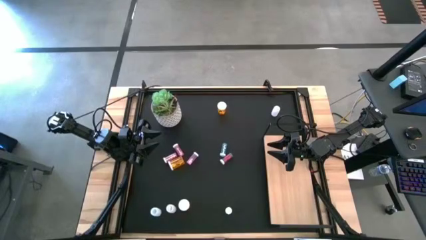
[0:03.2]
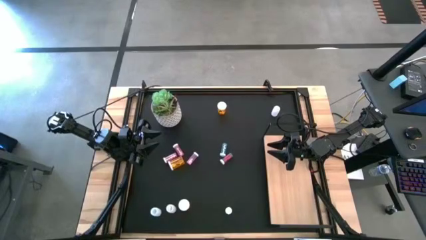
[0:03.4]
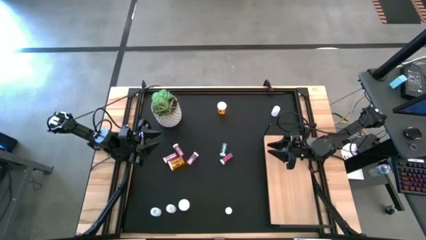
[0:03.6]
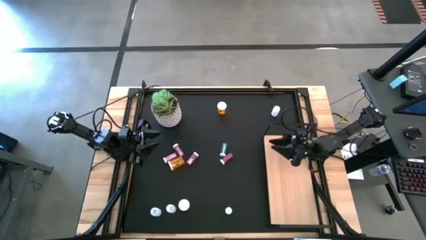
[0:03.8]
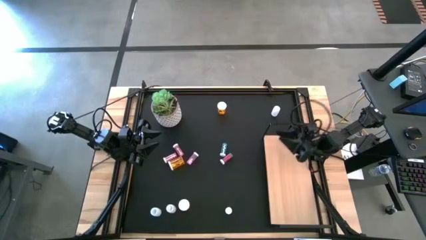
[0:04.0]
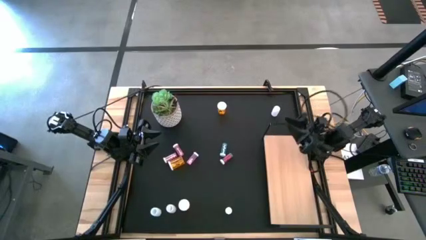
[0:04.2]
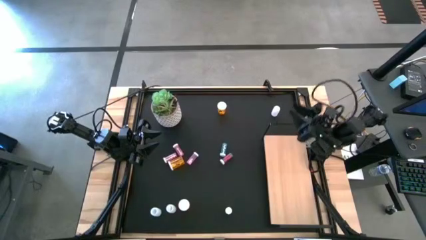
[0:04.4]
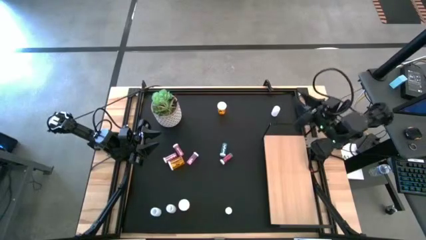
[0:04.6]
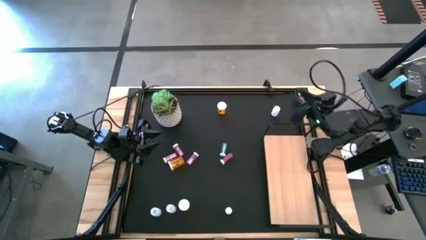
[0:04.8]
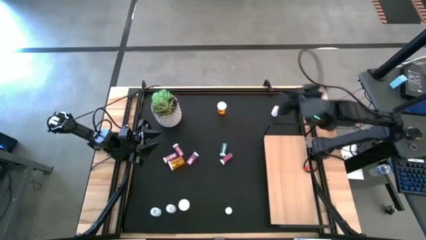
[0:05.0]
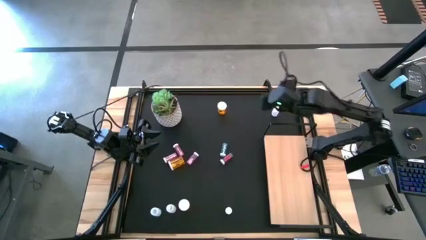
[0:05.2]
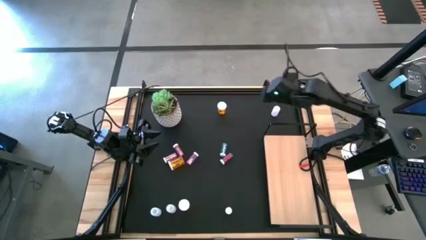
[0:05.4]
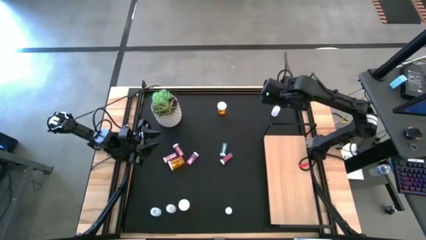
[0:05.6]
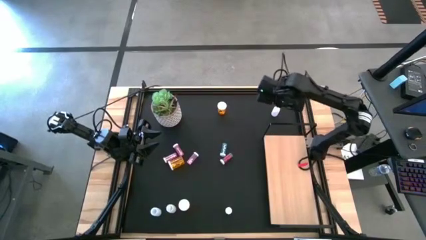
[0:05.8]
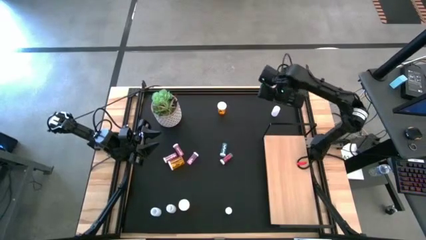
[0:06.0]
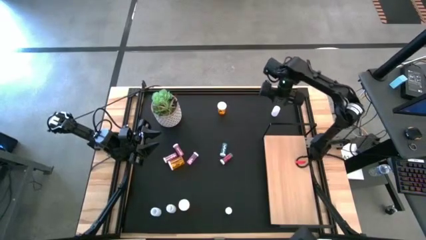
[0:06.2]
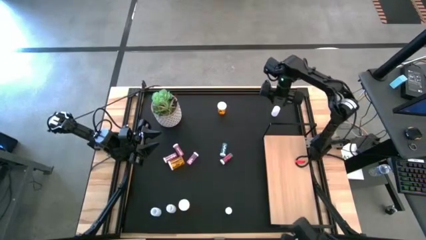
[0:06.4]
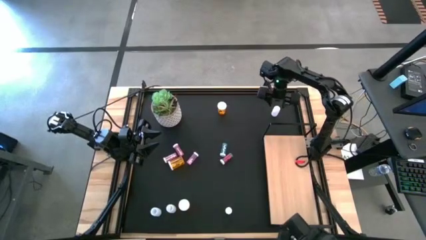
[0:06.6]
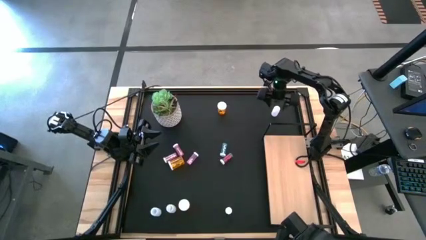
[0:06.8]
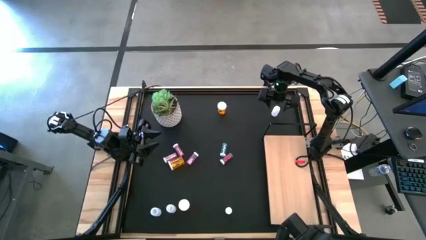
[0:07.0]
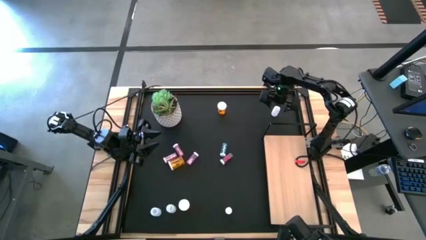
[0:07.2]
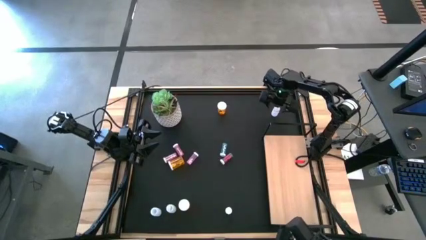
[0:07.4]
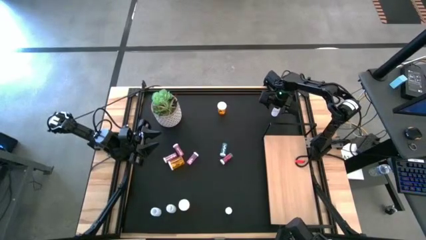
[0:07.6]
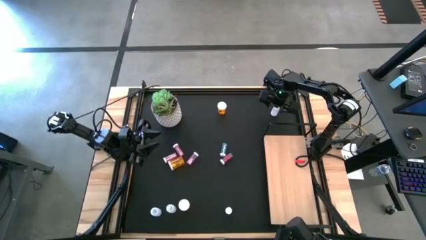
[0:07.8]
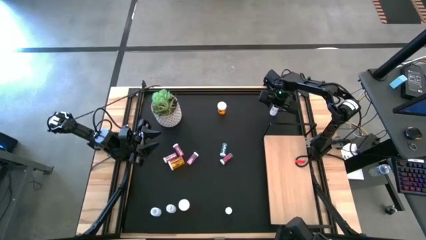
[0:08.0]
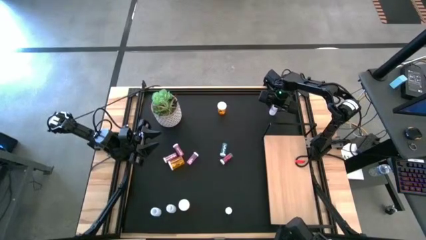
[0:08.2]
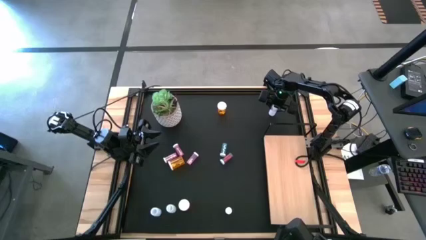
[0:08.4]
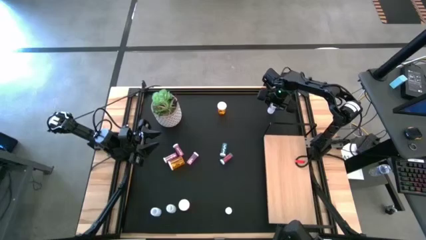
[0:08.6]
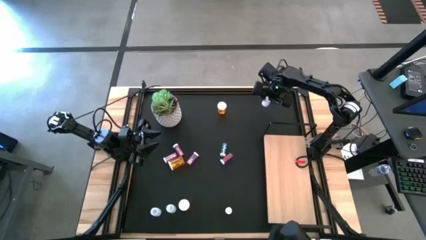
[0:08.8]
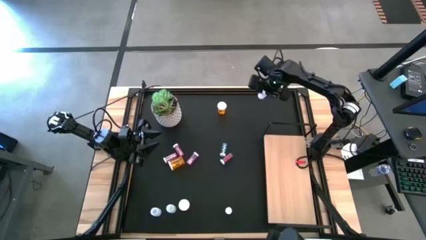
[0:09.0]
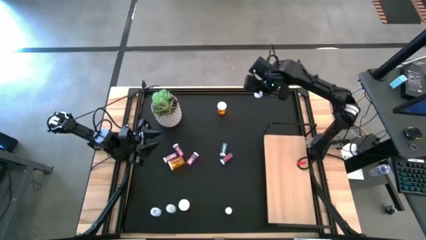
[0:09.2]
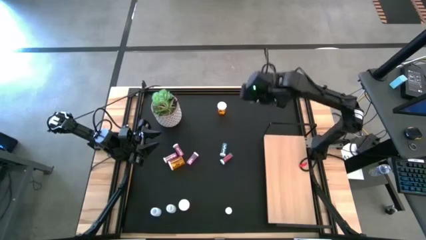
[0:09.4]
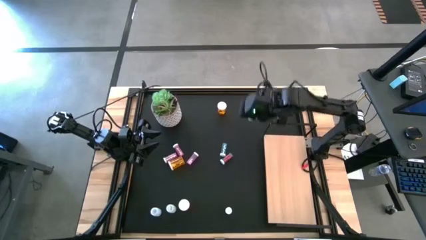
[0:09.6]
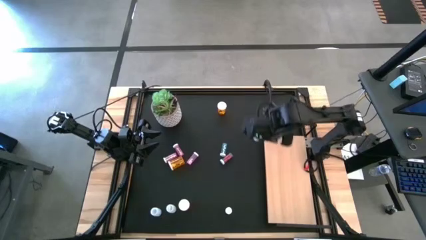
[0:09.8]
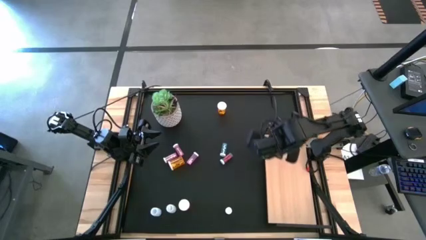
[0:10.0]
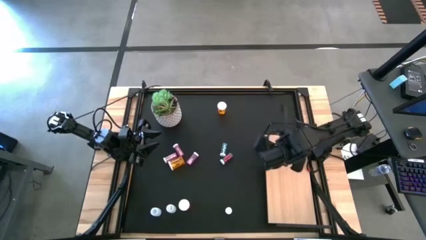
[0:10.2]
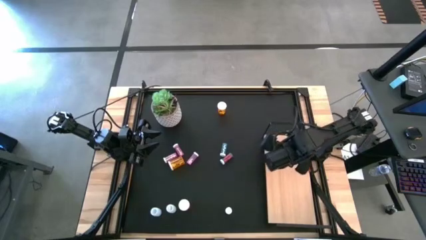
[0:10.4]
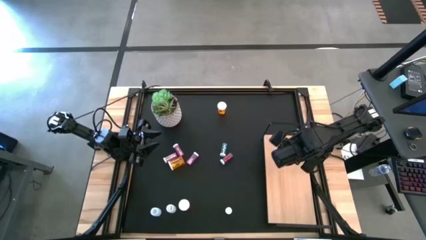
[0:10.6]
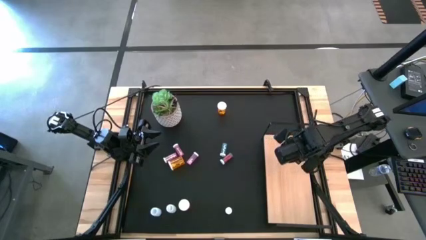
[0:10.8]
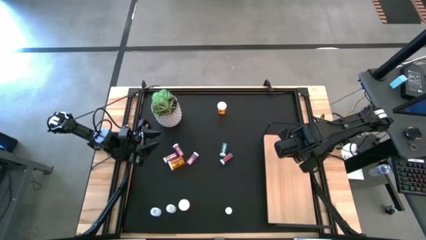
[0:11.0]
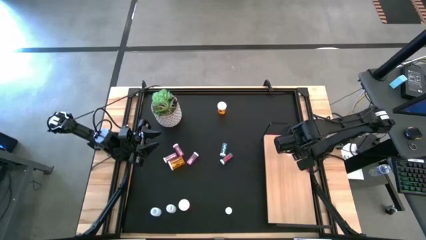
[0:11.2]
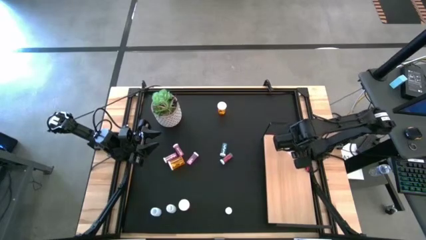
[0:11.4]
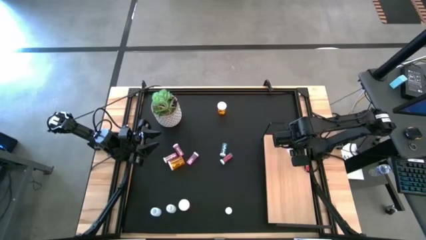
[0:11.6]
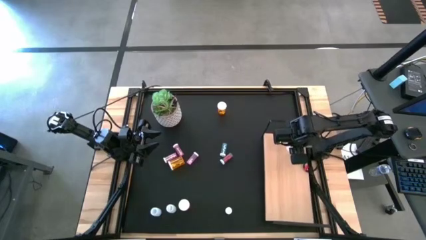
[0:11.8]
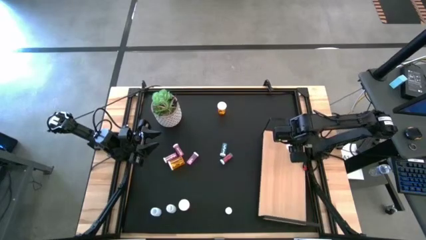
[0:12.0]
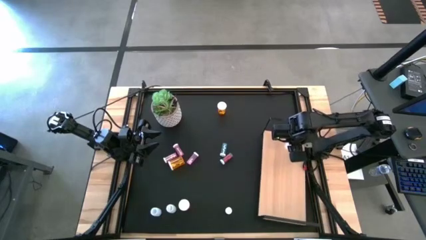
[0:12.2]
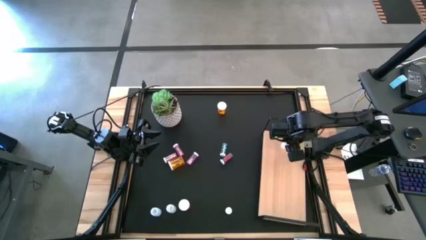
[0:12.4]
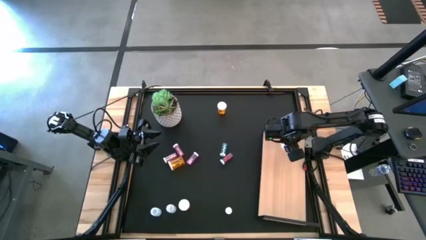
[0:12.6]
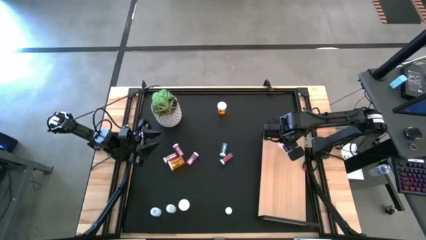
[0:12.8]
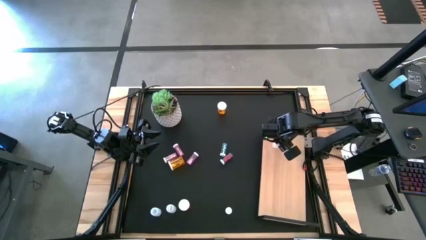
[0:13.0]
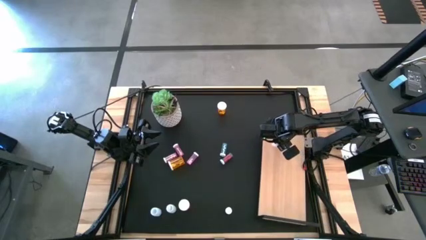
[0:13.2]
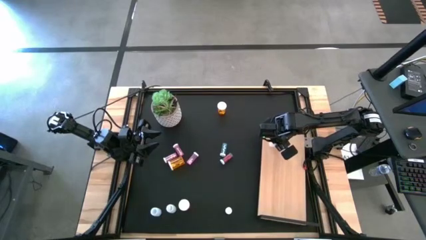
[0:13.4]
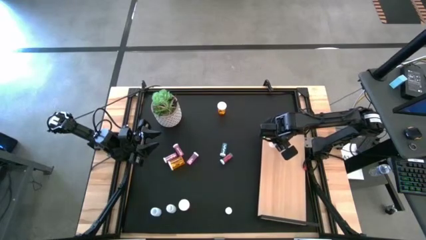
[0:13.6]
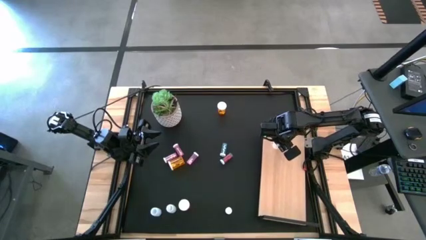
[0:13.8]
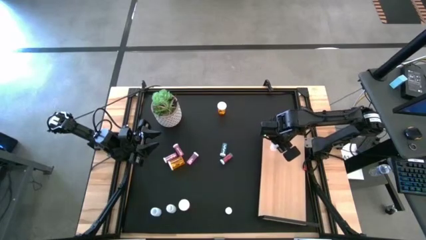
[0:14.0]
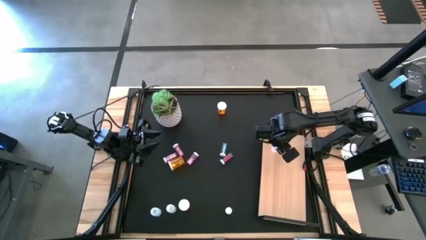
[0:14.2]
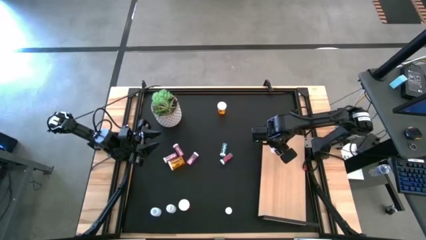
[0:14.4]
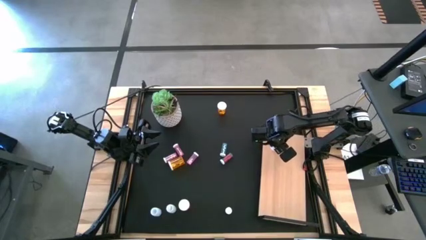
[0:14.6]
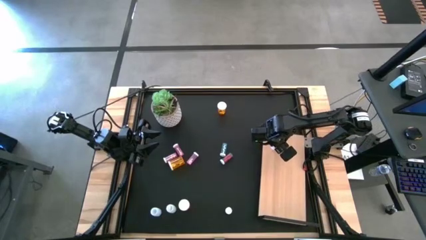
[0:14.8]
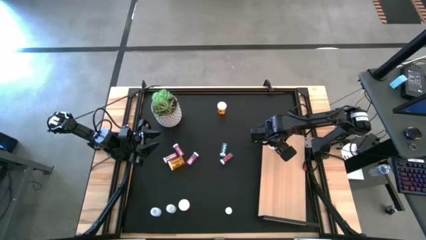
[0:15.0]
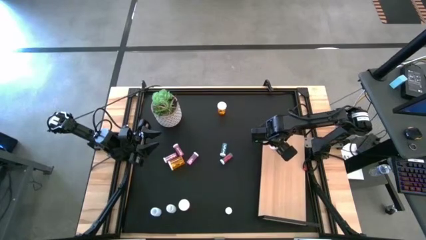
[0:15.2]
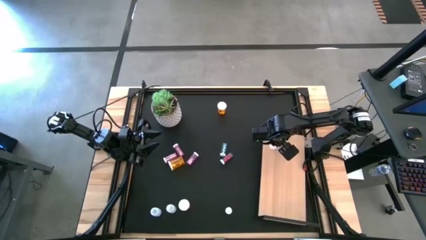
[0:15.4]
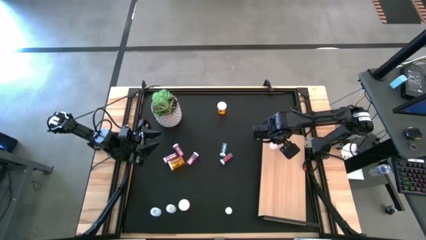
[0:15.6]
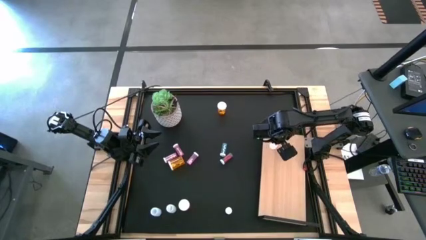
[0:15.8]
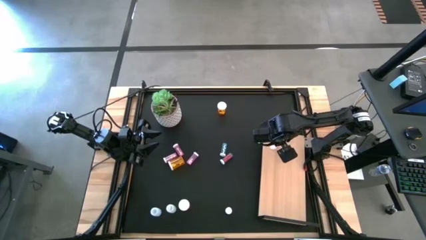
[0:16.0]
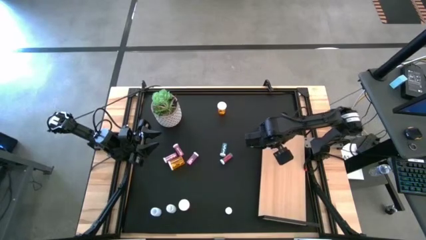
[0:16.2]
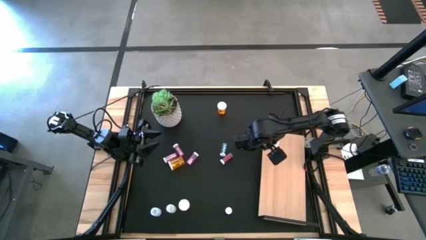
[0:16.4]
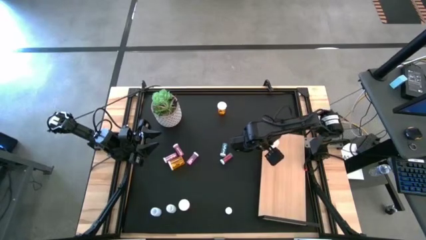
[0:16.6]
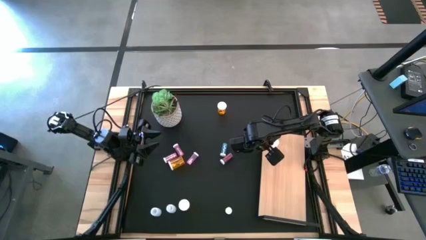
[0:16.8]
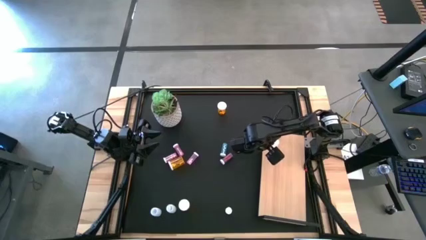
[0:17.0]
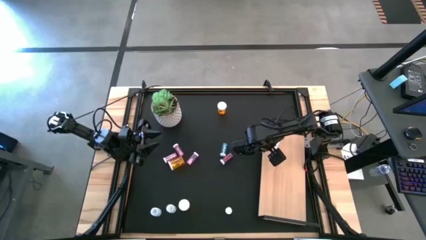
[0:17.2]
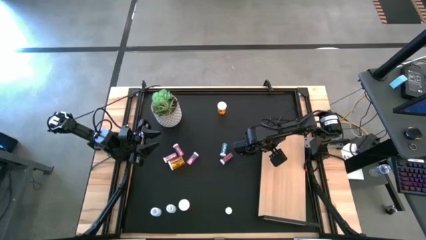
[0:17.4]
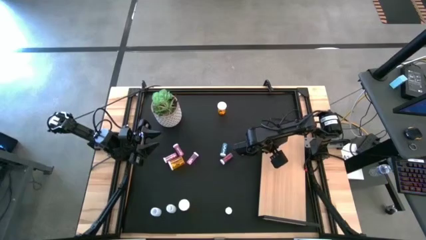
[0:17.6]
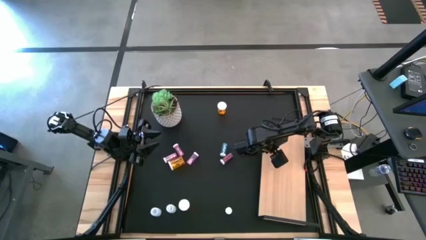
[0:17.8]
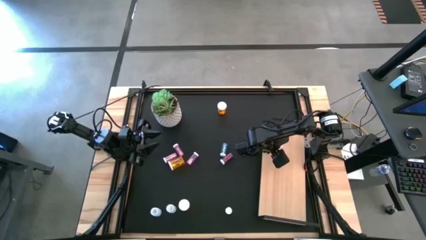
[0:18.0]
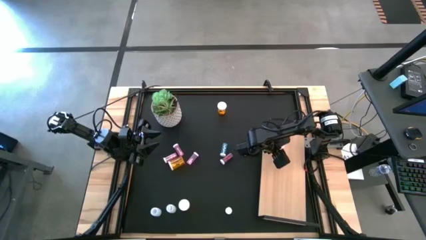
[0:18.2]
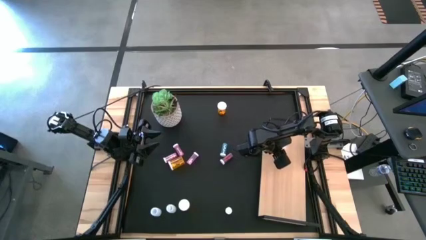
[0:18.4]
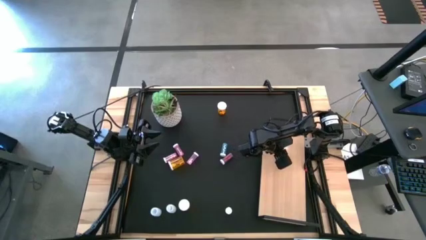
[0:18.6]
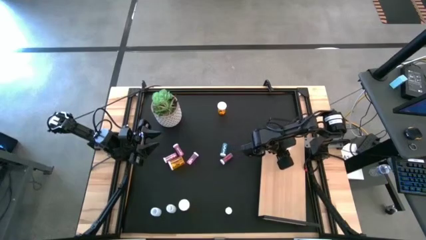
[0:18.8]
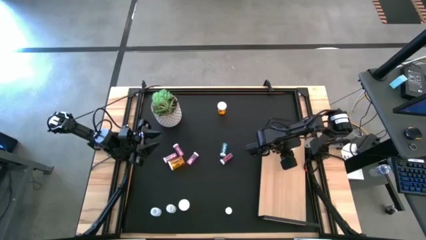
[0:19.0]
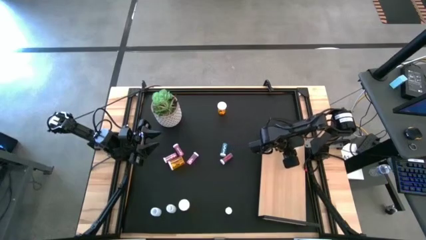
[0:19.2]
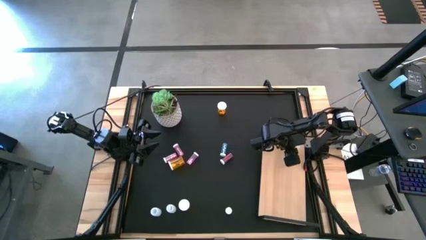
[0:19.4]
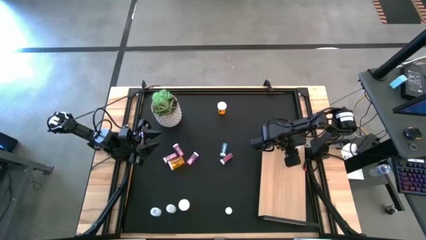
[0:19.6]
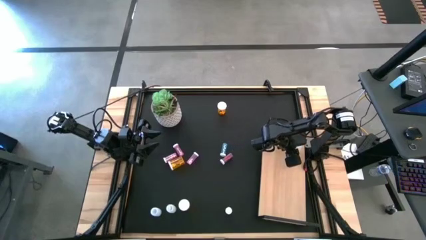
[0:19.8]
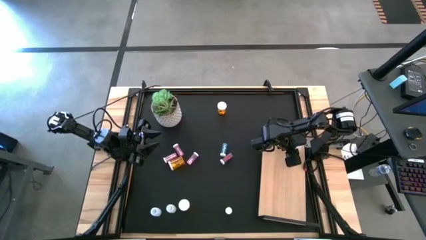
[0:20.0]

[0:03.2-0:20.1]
Task: Pick and place medicine bottles onto shelf by color
Put the top white pill bottle on the shelf
